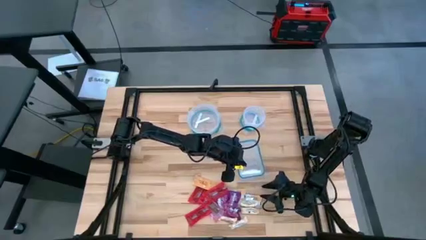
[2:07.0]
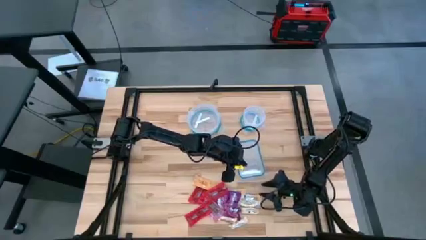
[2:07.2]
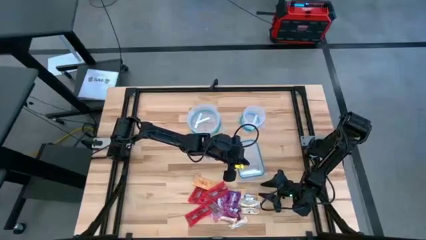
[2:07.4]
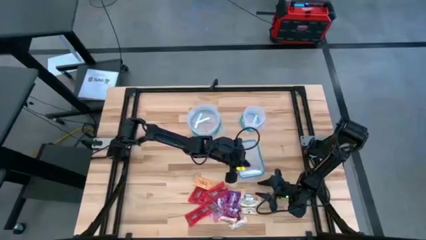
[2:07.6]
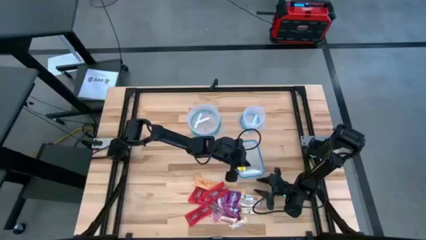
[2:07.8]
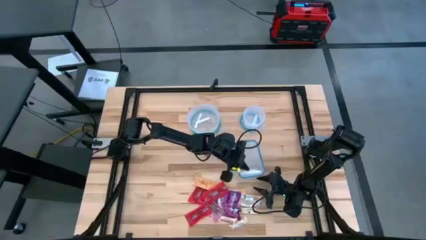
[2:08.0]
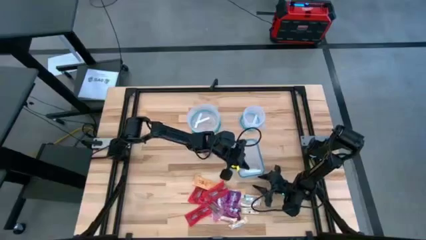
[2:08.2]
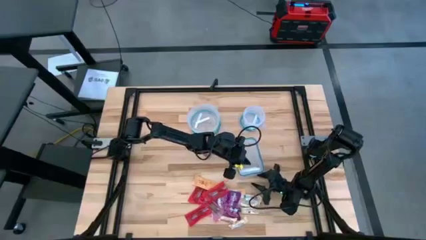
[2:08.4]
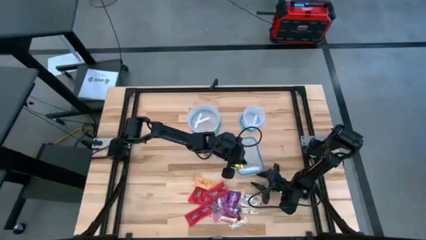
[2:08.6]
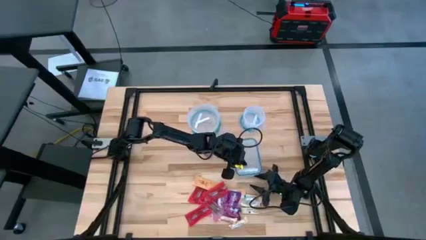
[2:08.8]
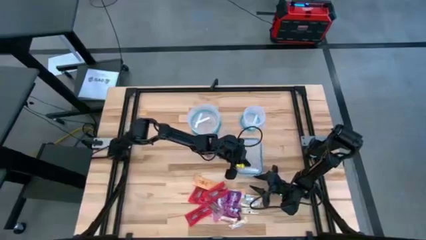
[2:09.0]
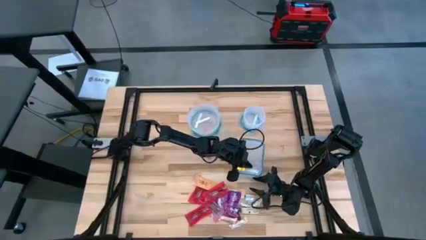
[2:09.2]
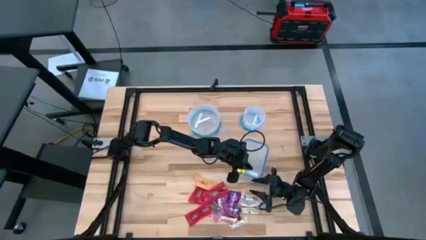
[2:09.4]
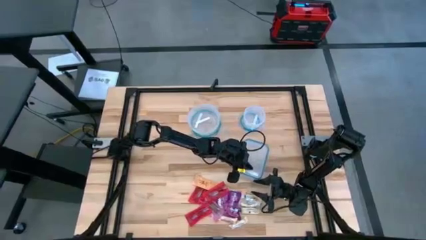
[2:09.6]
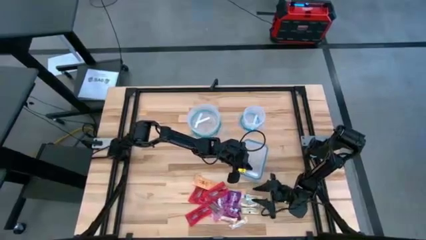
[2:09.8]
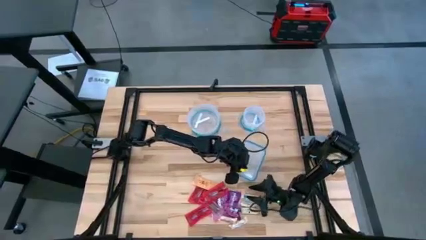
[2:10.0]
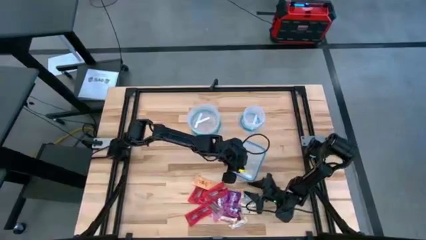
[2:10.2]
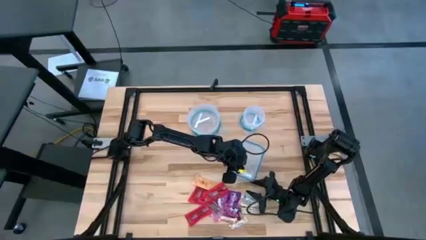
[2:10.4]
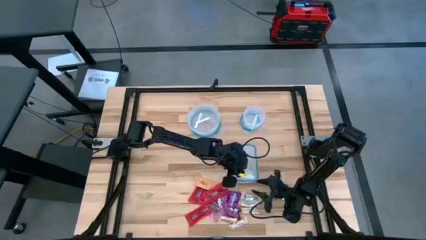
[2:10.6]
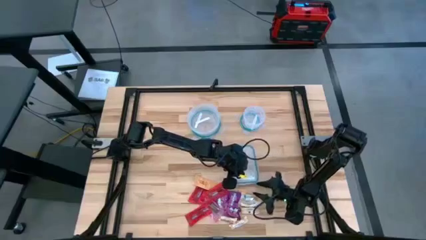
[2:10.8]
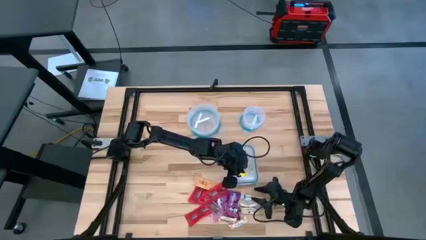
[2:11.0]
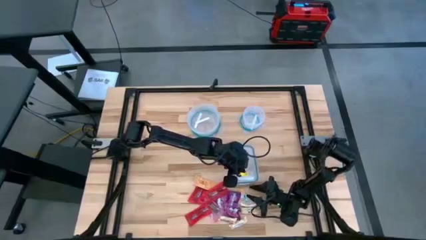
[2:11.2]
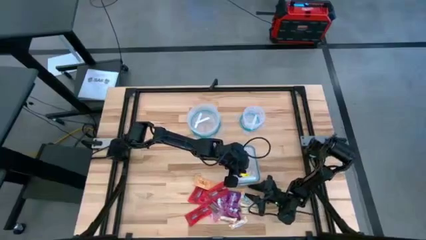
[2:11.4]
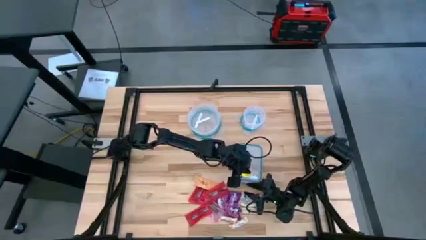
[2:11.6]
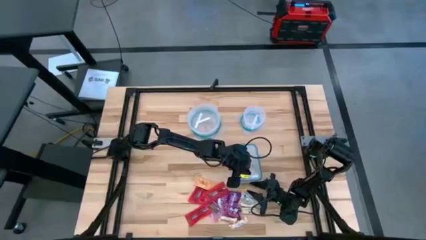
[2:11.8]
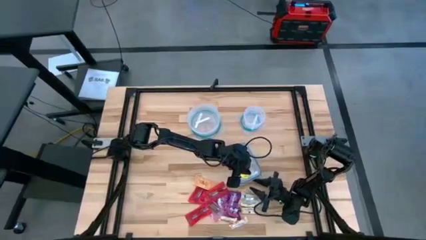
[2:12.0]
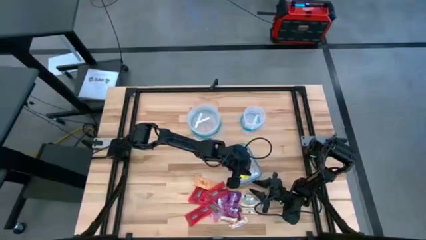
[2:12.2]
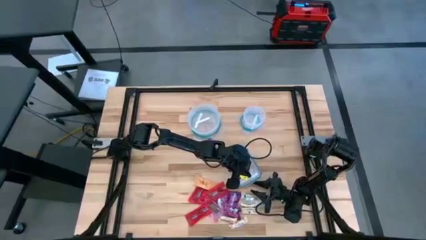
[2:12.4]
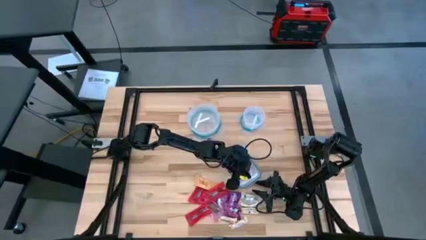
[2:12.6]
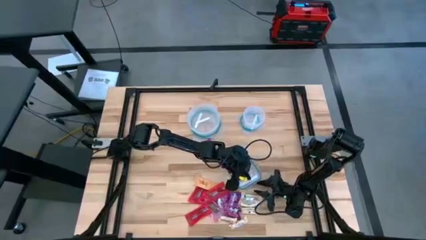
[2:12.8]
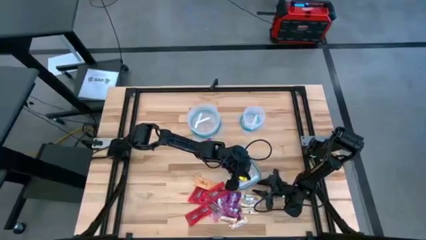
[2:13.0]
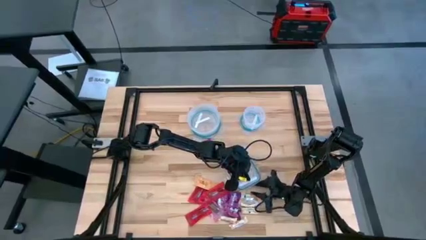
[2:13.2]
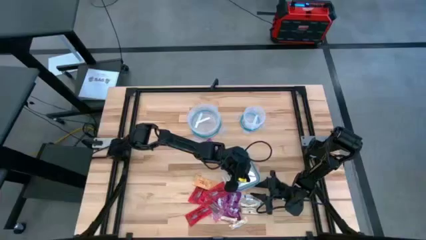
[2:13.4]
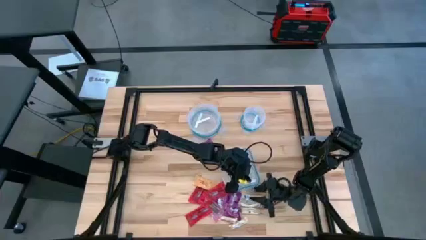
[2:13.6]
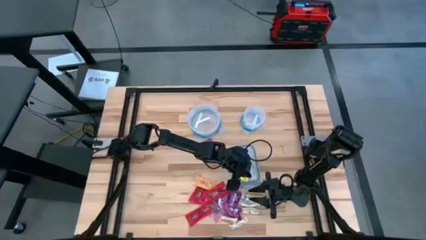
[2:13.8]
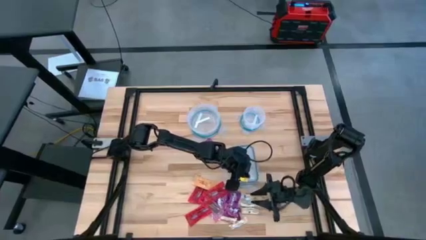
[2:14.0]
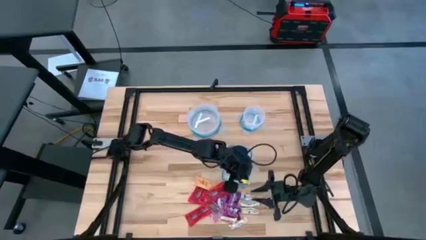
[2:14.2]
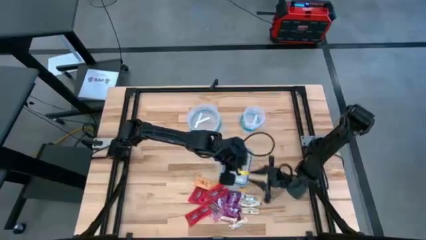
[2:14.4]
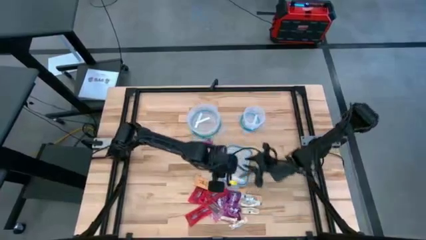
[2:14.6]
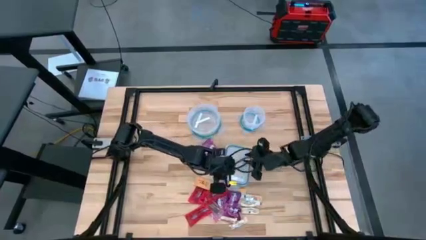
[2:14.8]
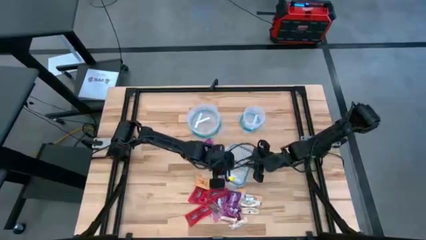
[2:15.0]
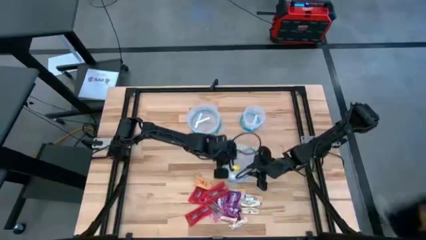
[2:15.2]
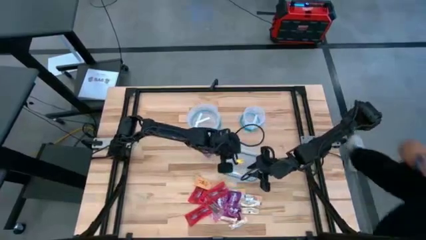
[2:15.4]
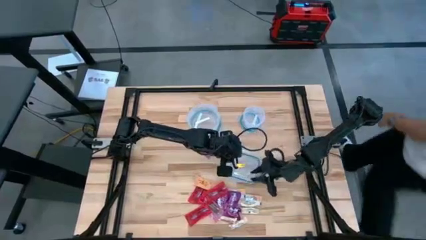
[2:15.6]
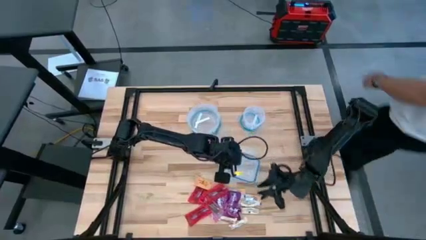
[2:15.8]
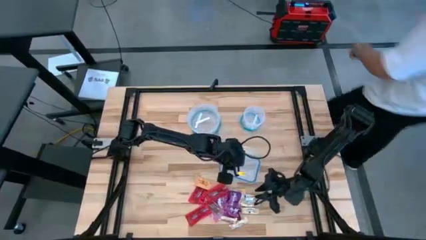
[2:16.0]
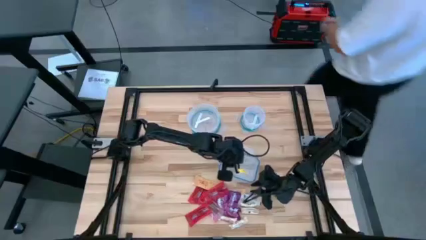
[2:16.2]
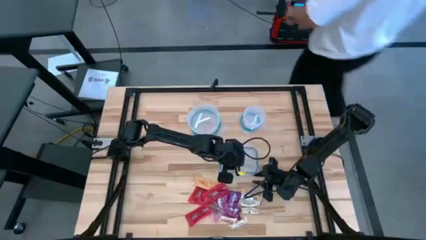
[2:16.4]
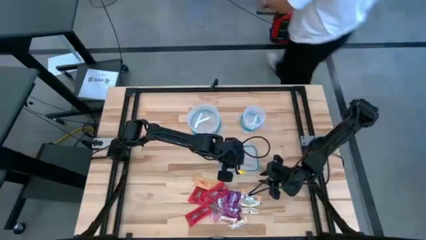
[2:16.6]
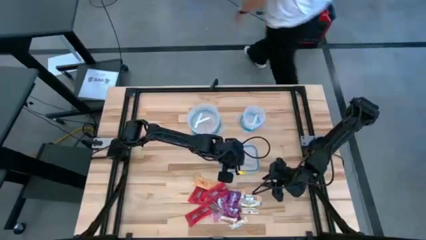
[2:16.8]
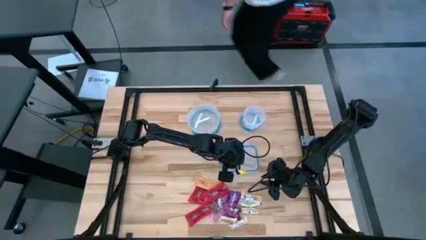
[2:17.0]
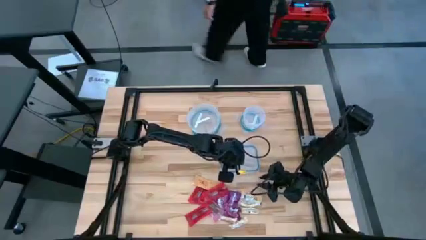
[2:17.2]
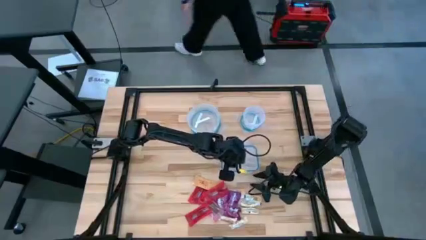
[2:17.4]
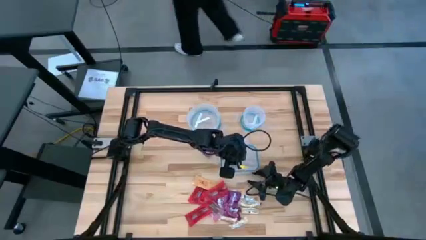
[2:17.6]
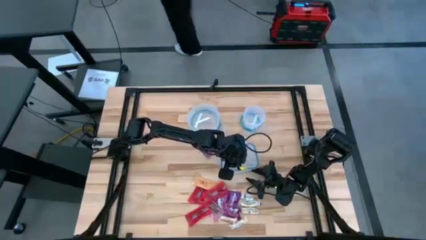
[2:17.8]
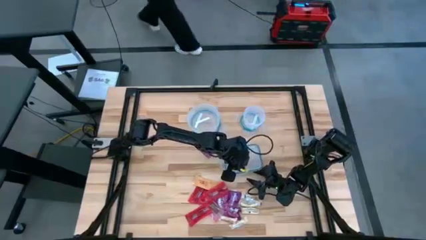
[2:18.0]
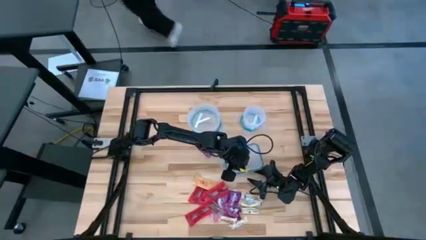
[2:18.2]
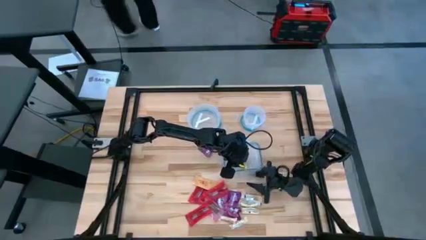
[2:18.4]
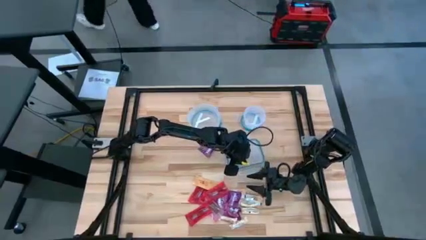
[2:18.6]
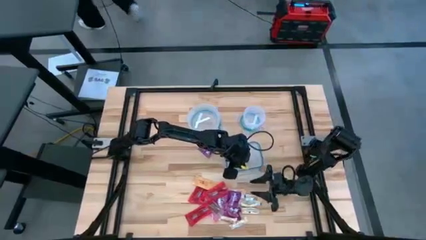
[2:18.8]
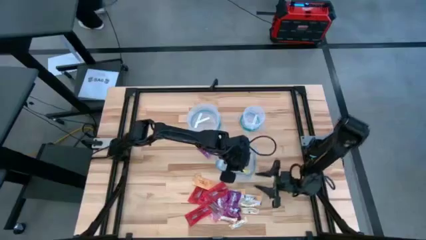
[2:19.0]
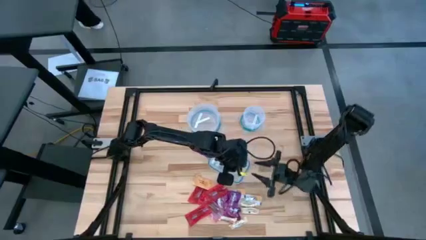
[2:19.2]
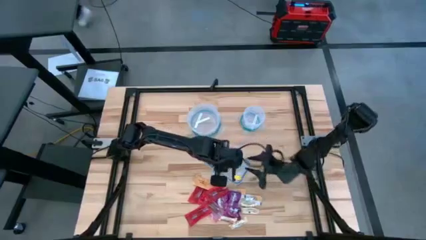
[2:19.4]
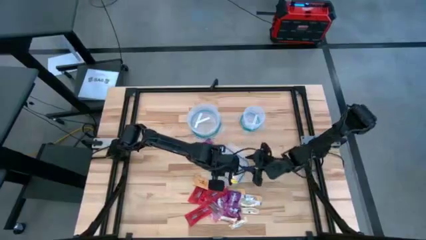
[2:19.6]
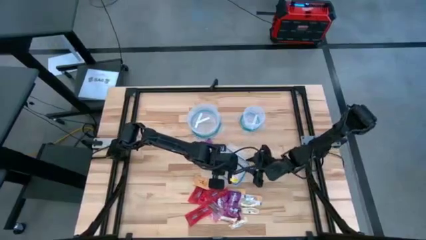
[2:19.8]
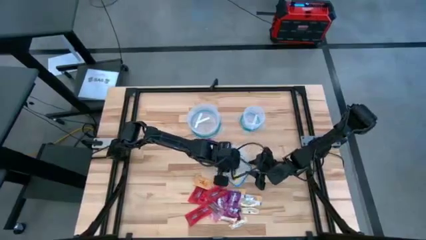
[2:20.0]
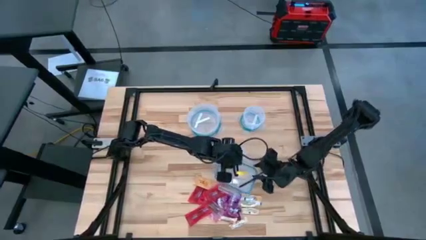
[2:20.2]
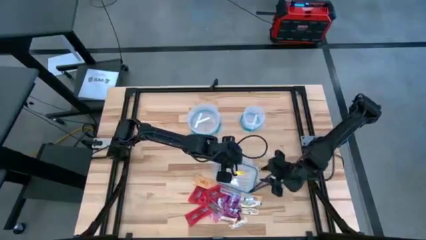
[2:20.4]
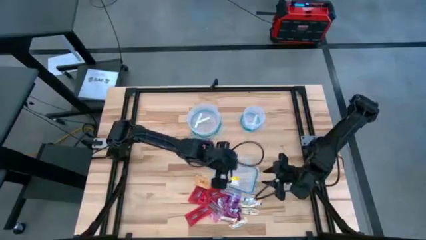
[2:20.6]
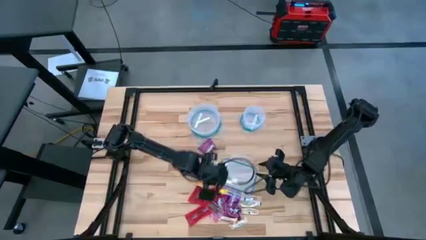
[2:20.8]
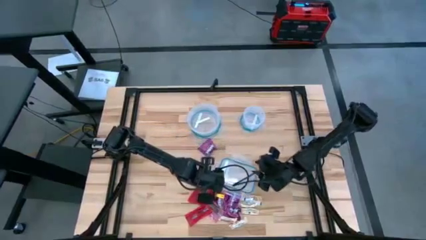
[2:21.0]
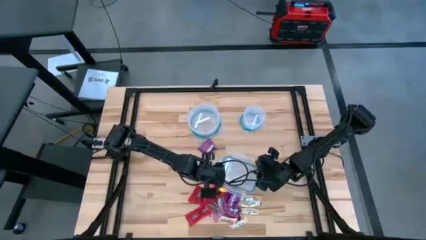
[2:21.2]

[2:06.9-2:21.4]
Task: Sort candy
Open the rectangular transparent bin
